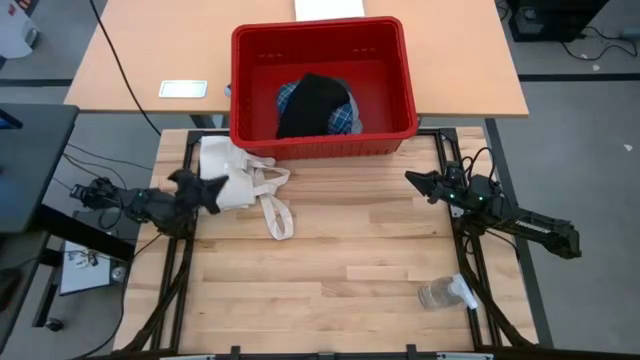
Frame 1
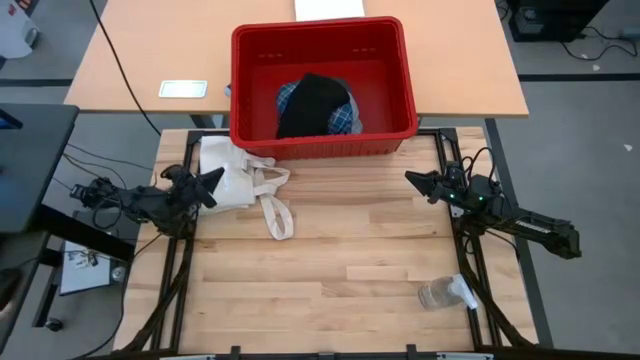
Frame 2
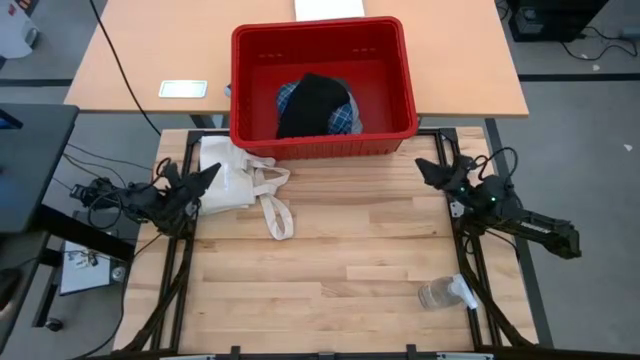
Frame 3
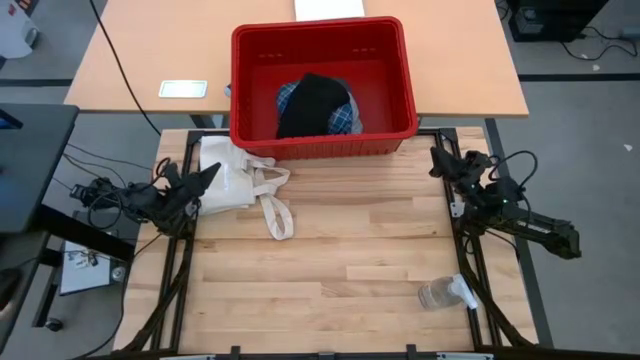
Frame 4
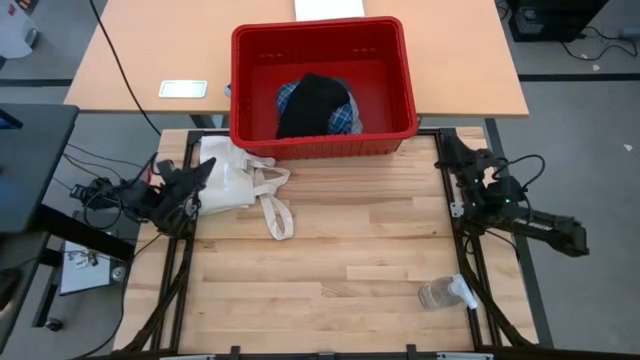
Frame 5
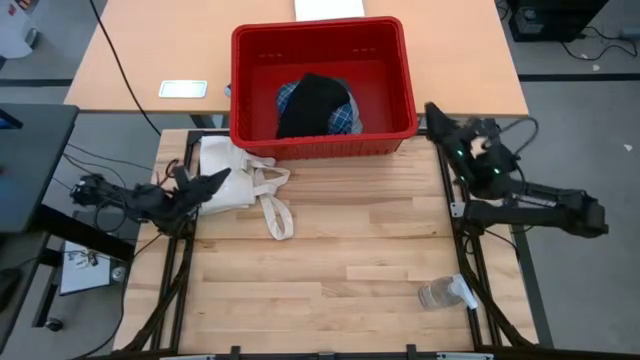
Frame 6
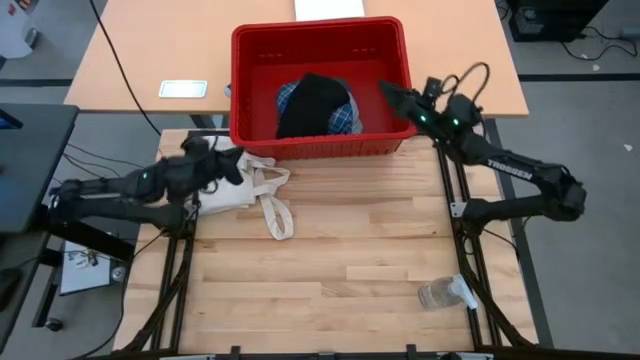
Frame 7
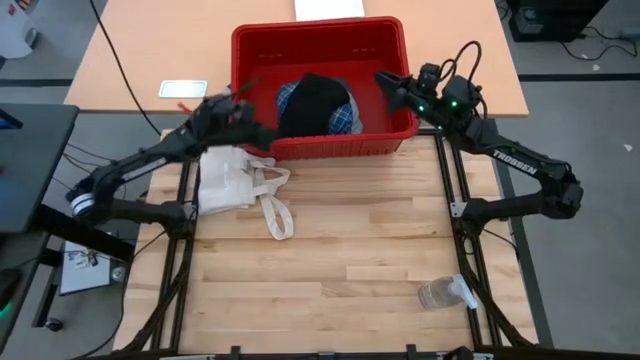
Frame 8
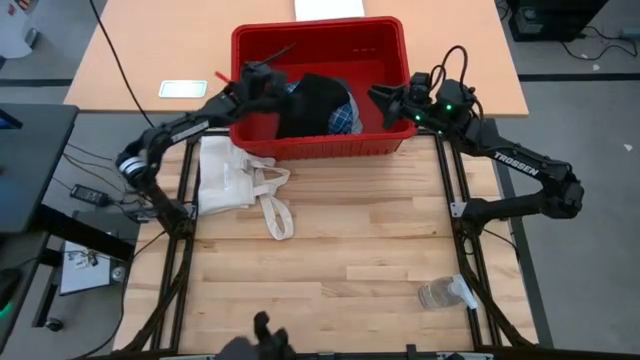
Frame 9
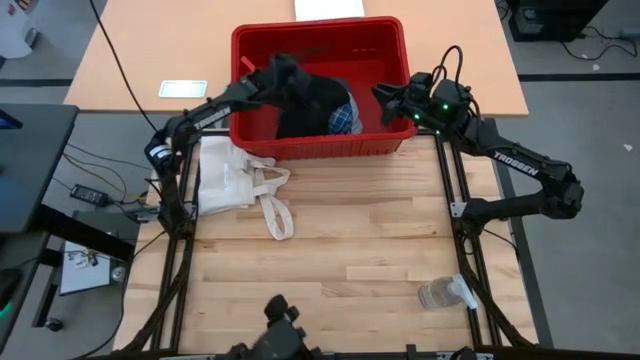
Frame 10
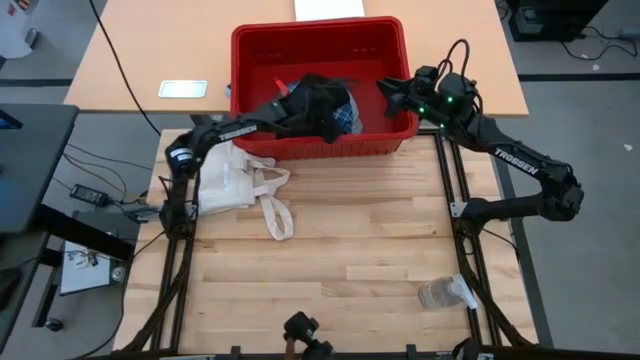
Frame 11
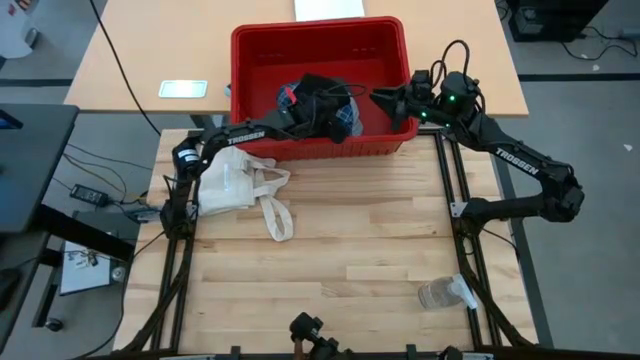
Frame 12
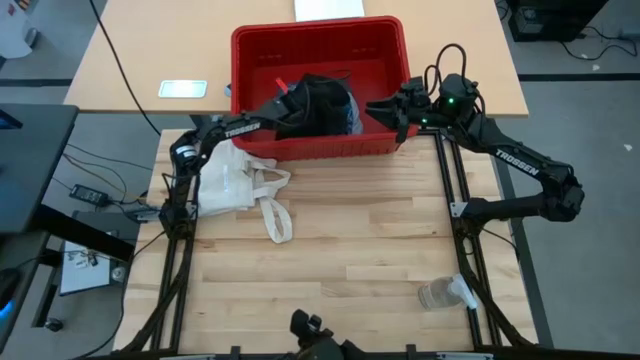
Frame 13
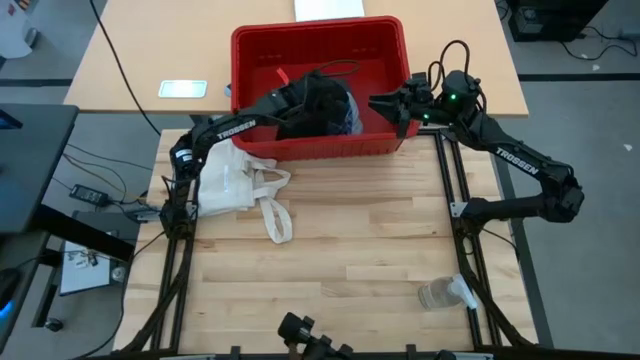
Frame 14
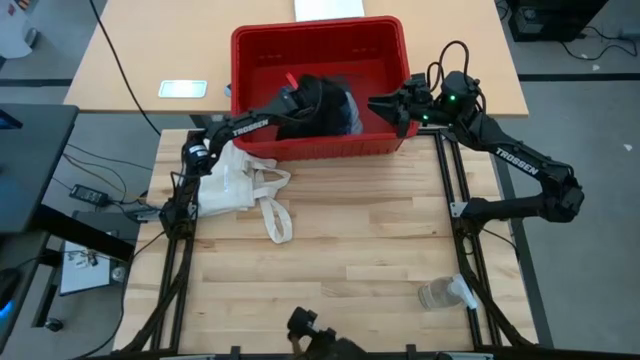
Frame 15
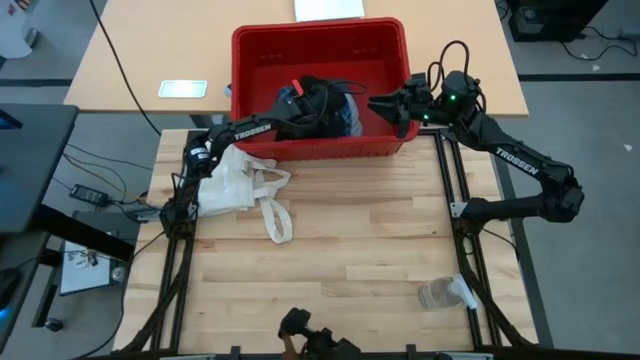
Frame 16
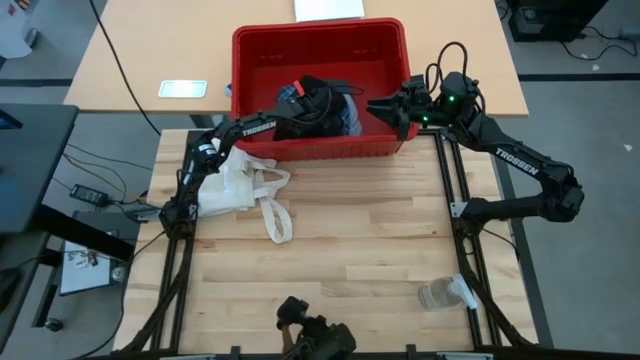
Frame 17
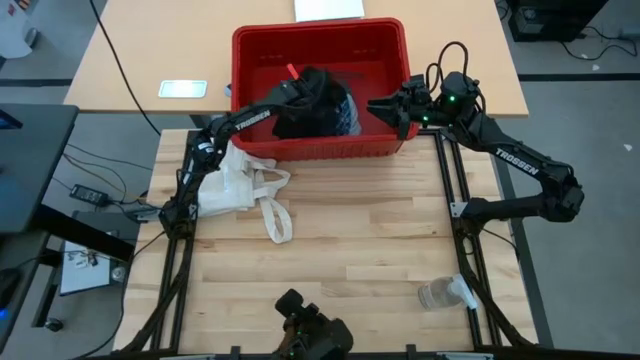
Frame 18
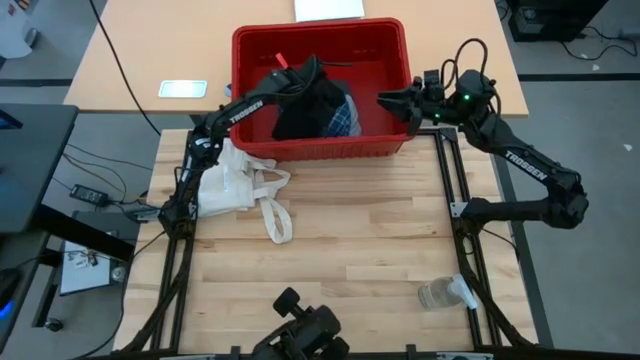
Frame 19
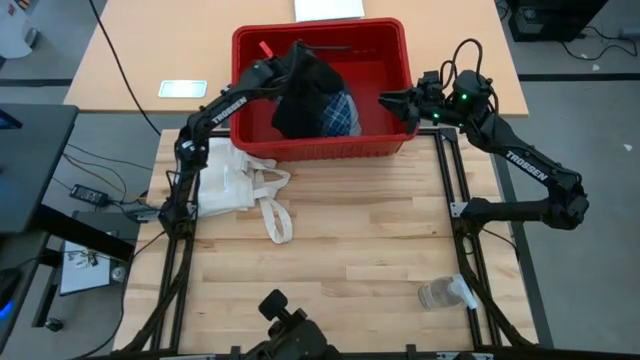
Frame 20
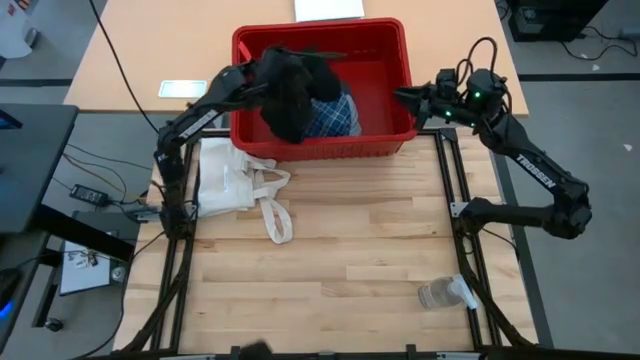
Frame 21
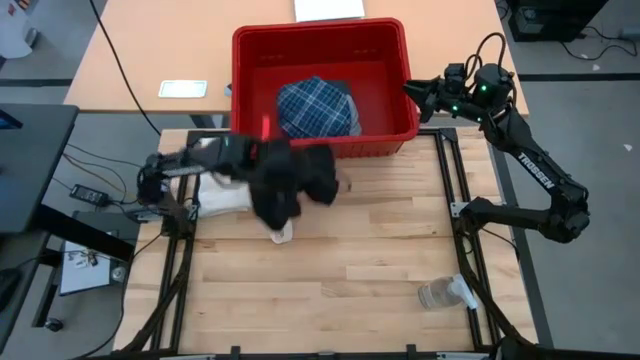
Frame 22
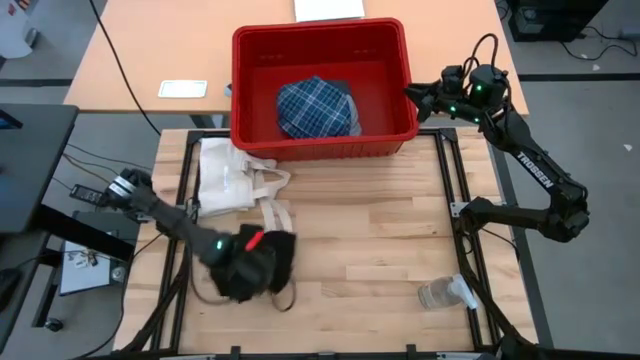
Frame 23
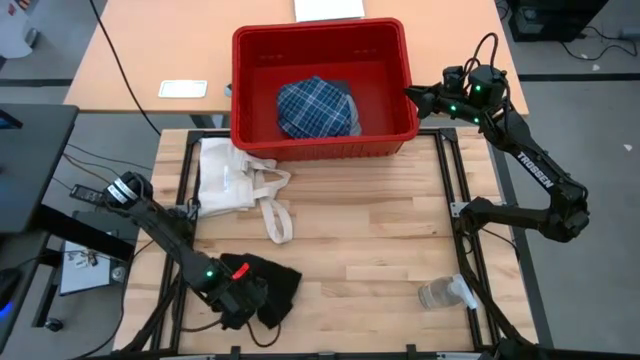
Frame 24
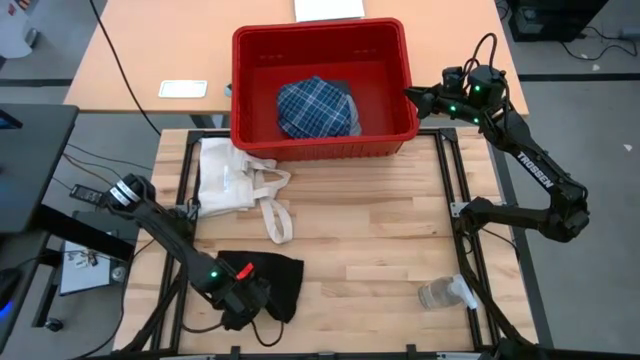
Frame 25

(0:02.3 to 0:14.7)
Task: Fold laundry
Remove the black shirt from the red bin

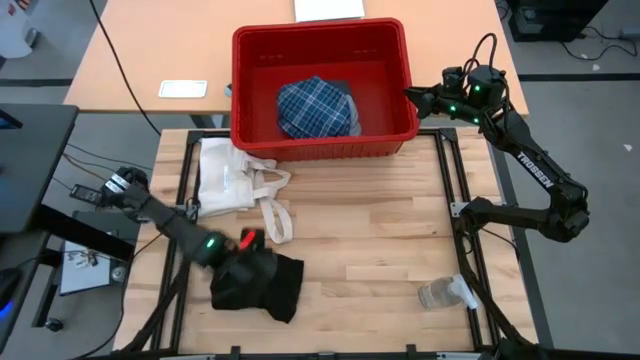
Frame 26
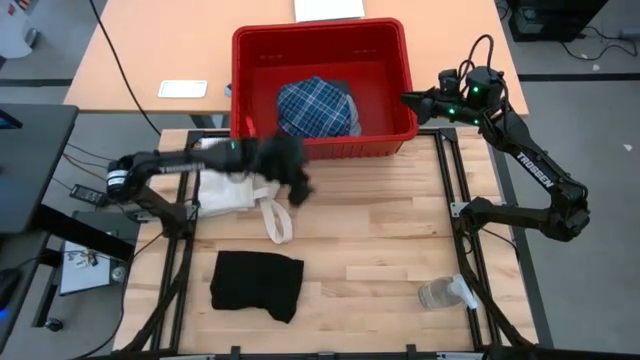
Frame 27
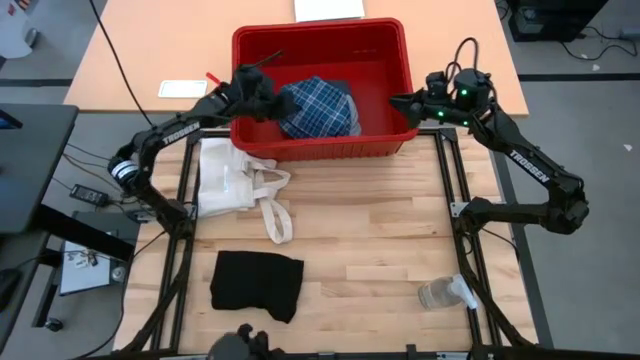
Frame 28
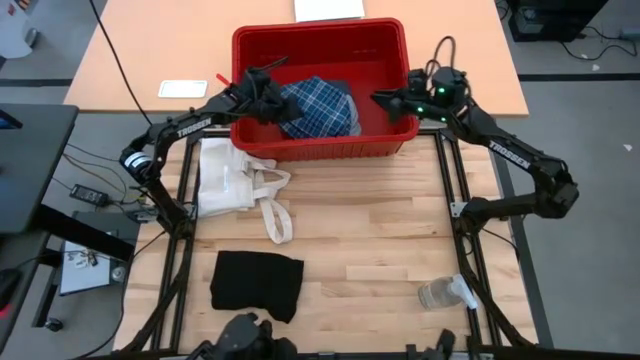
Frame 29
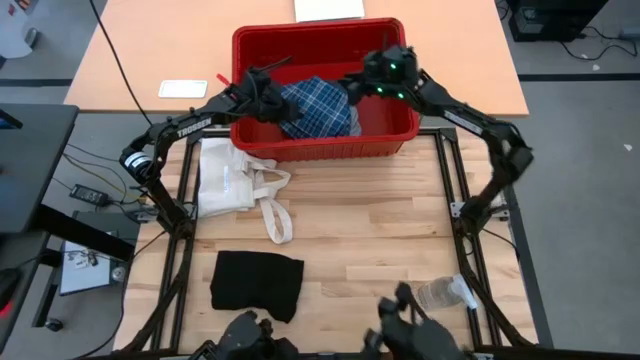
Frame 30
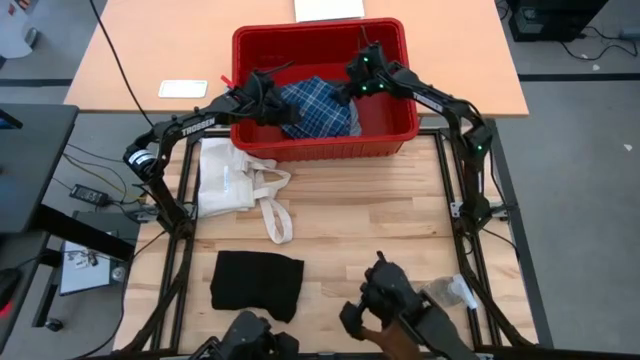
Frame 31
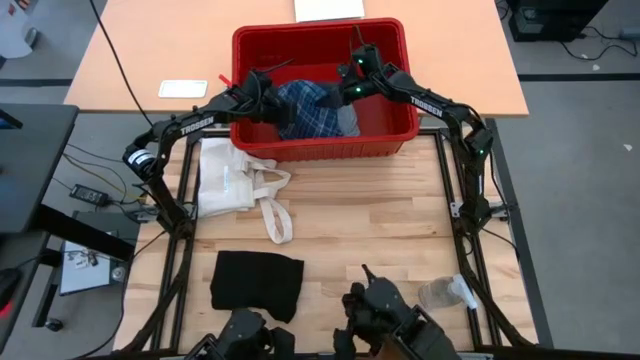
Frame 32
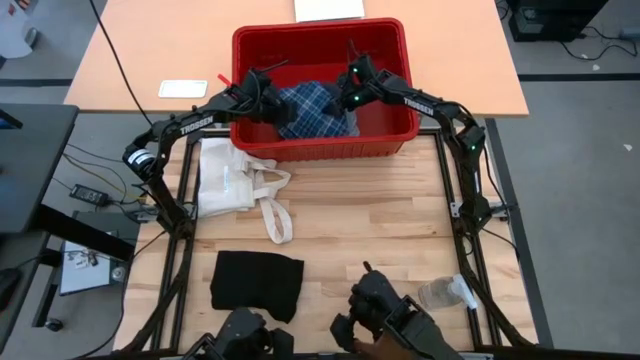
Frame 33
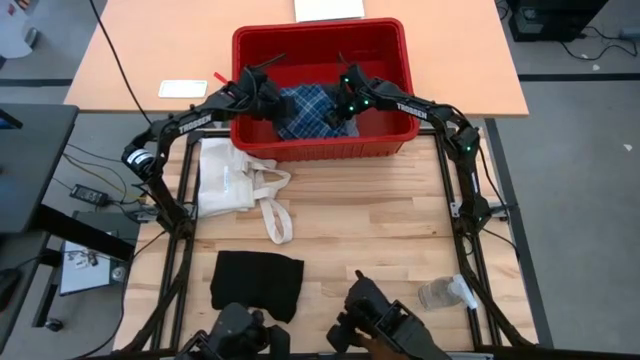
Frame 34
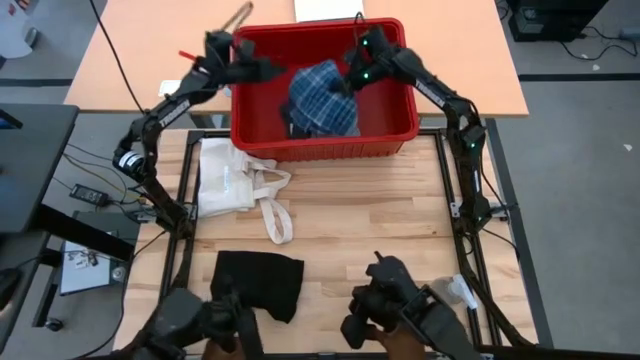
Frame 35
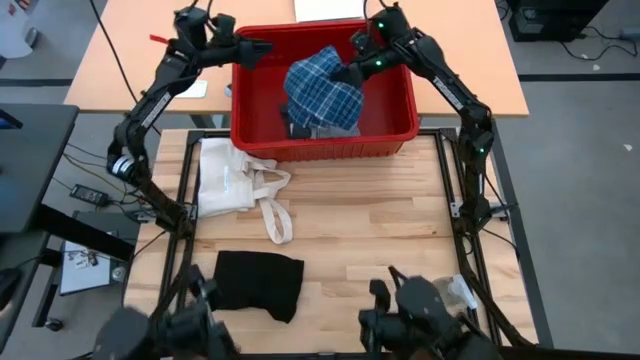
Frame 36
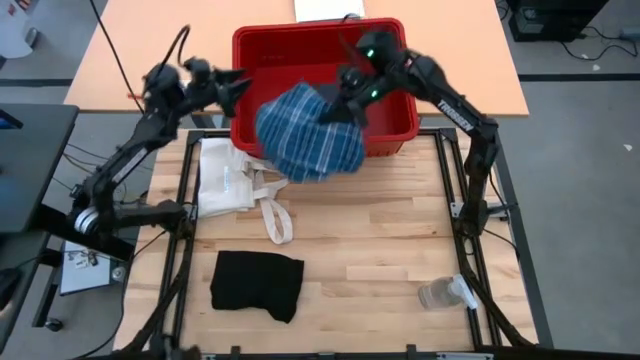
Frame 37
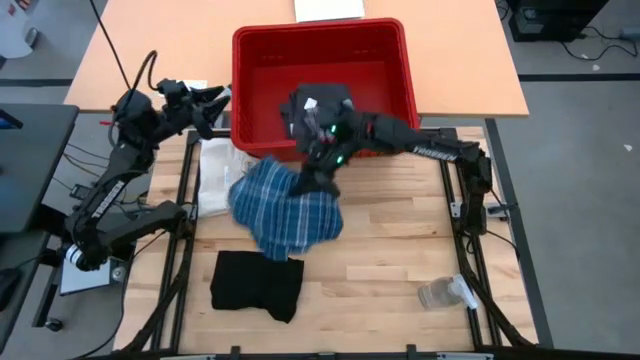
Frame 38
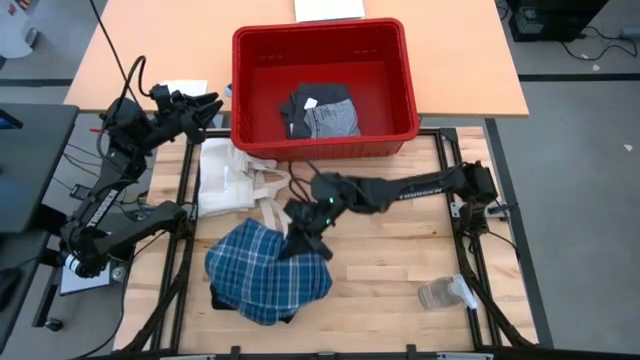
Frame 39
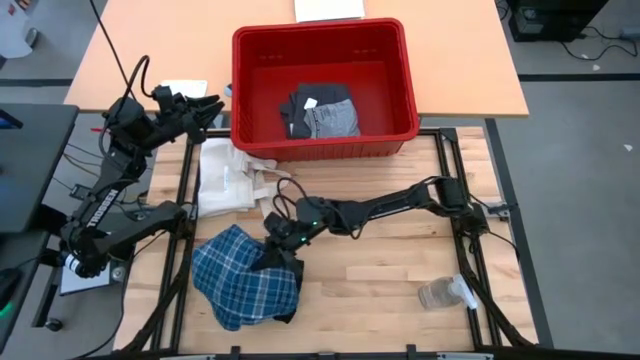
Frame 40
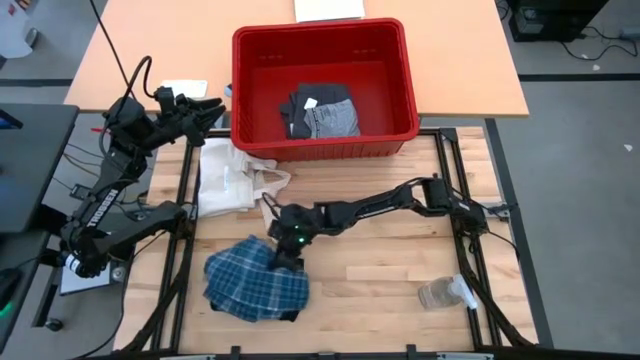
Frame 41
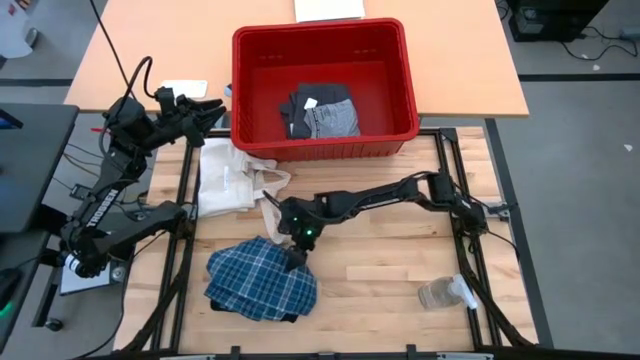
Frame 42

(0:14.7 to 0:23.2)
Remove the blue polo shirt from the red bin
